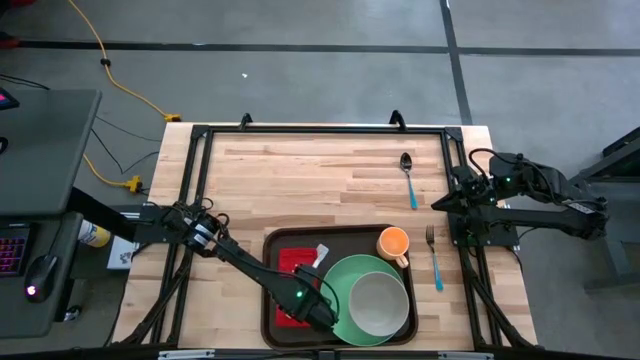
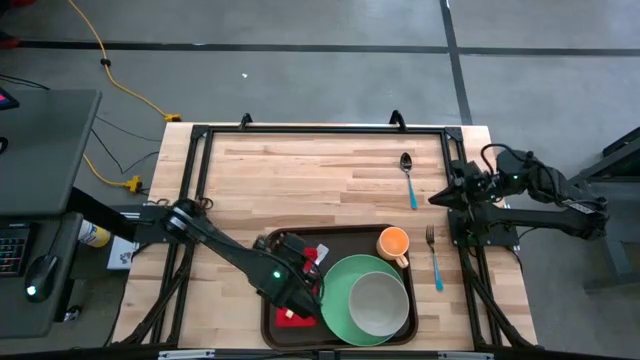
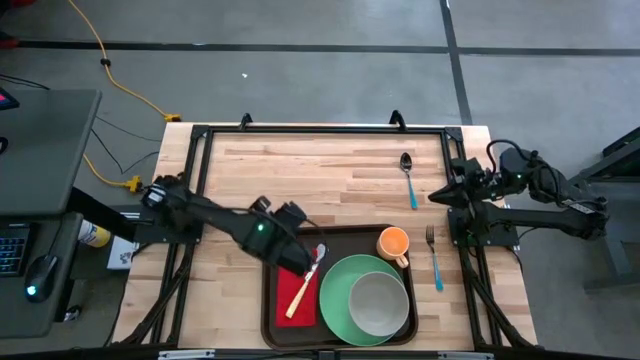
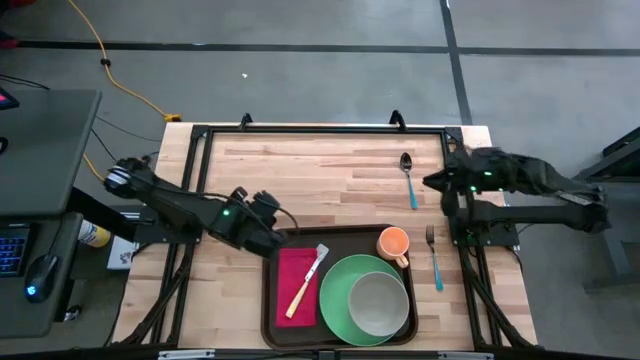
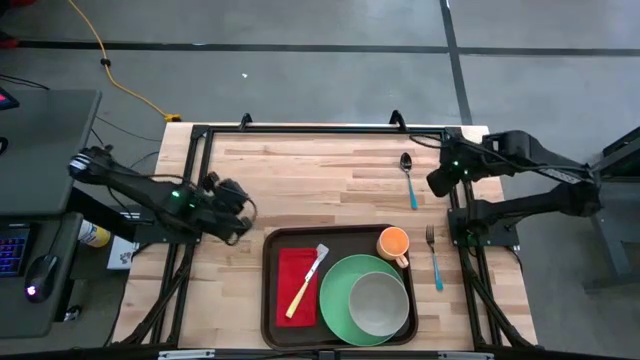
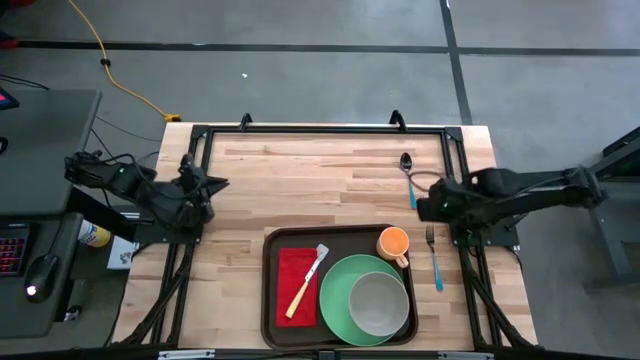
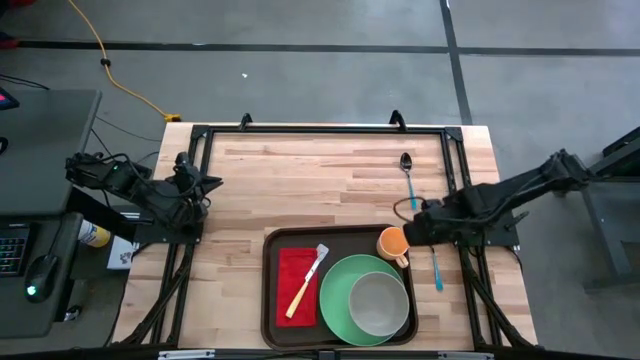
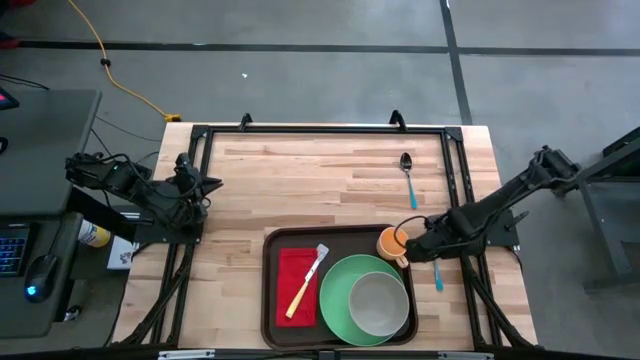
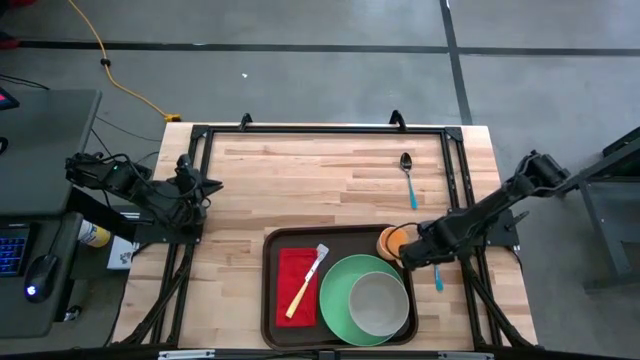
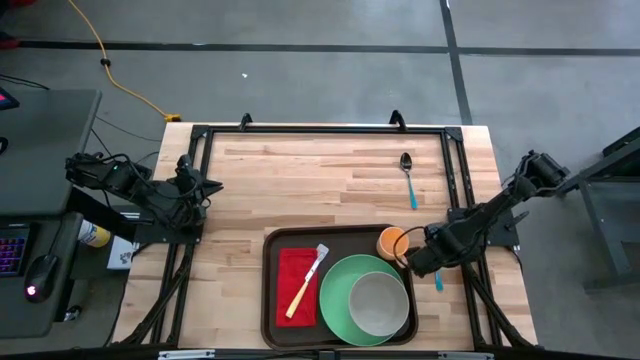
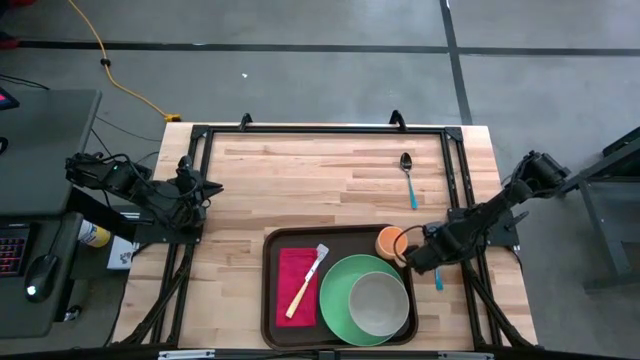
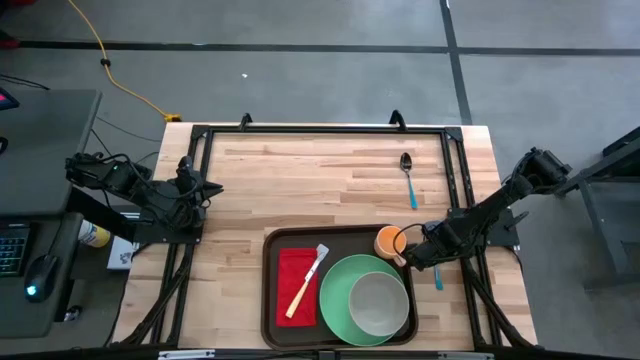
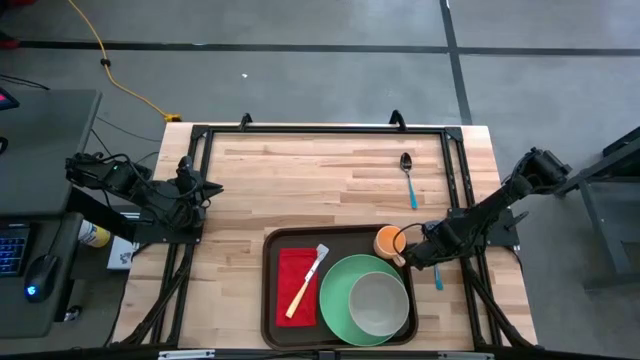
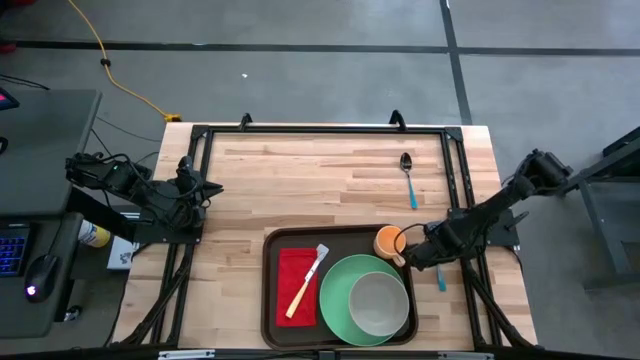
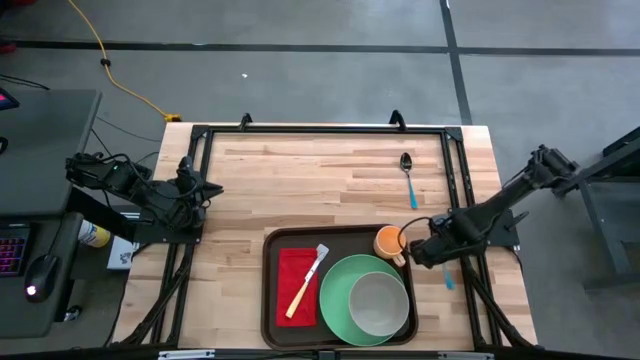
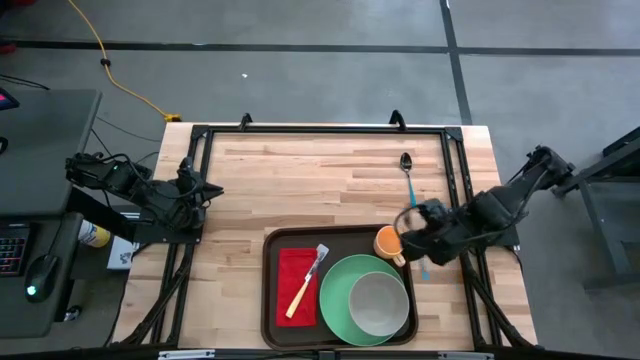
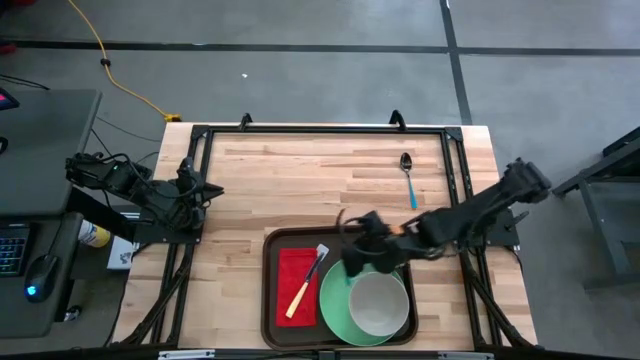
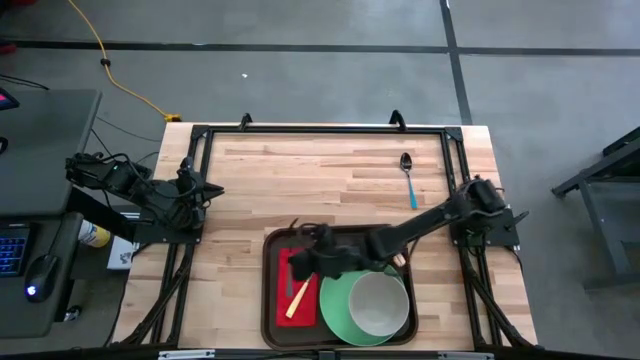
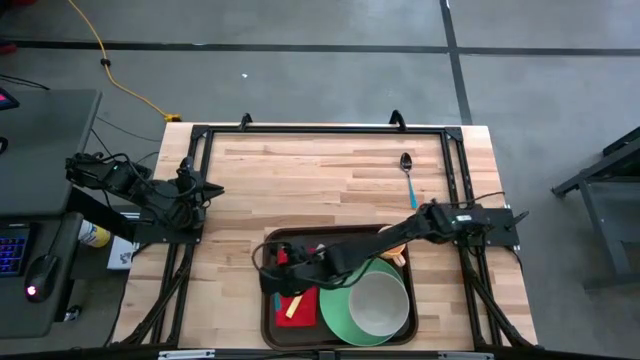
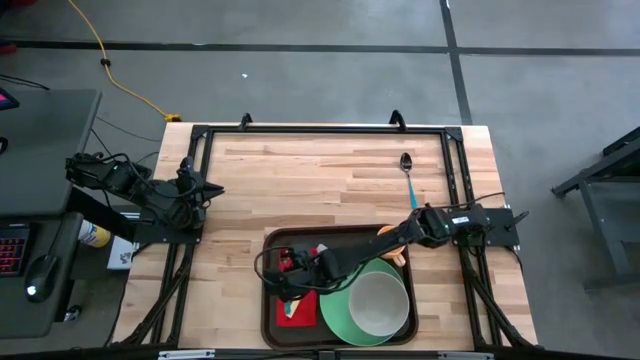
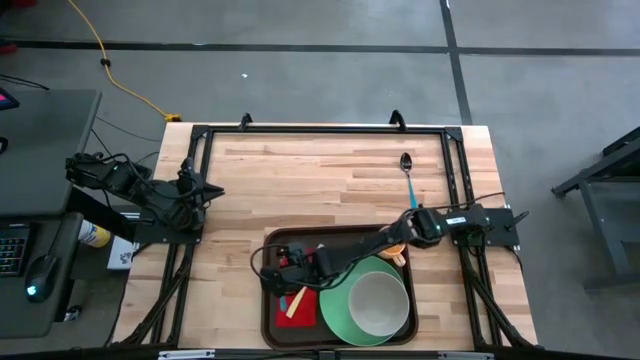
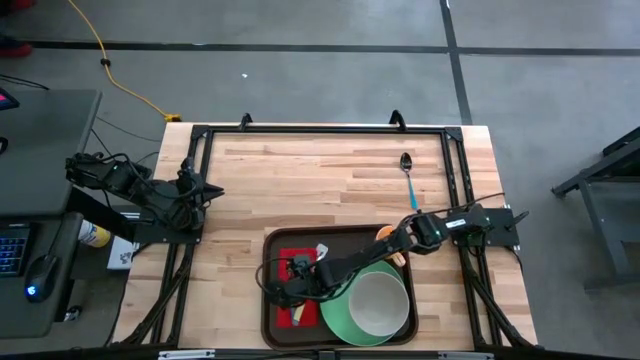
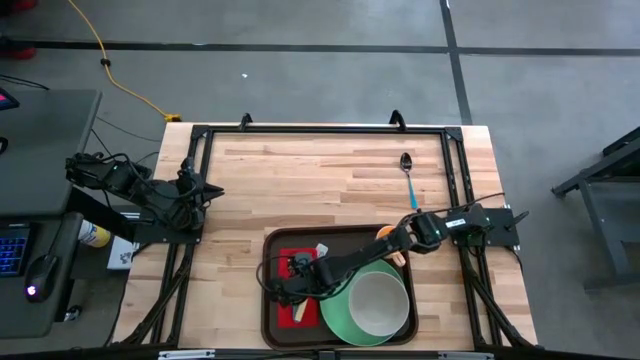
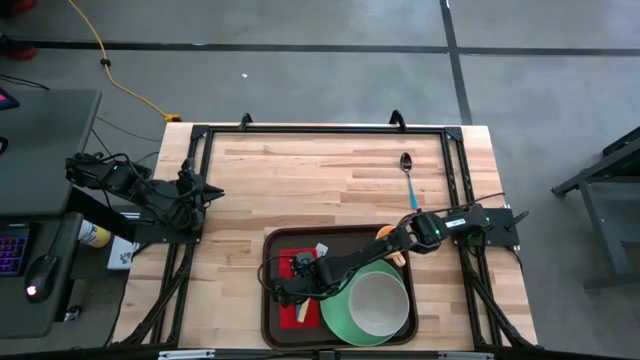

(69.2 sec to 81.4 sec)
Task: Set up tray
Put the blue fork on the red napkin to the left side of the yellow knife

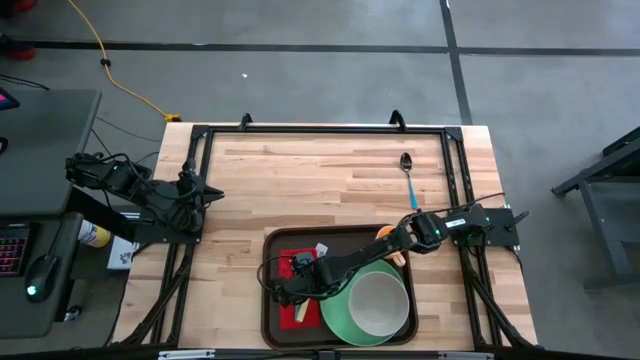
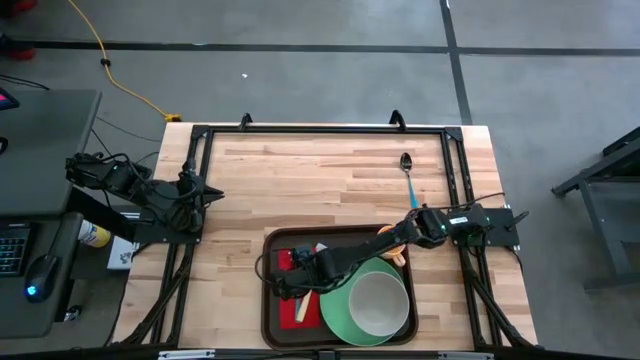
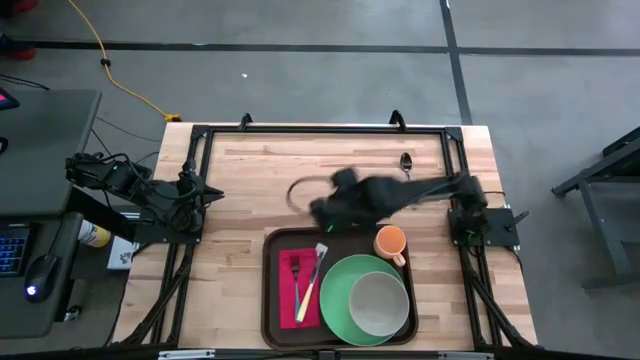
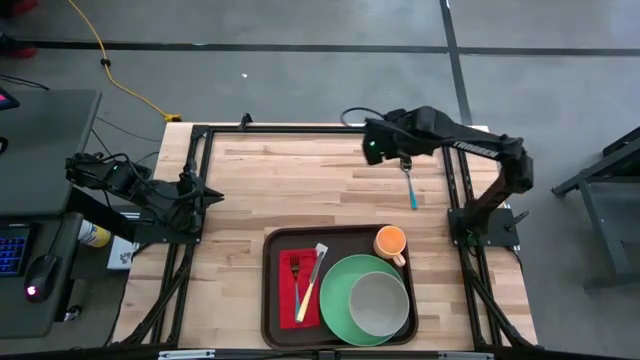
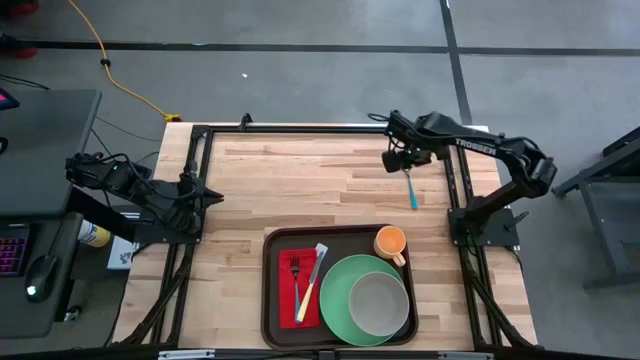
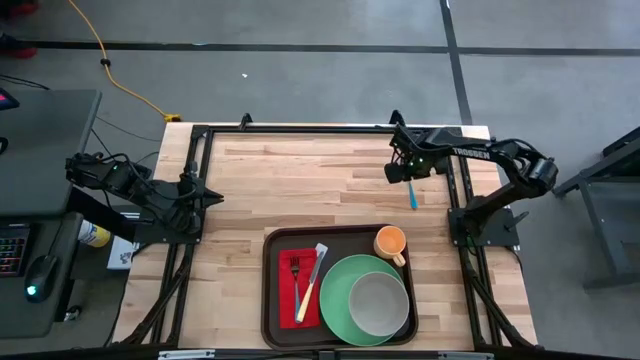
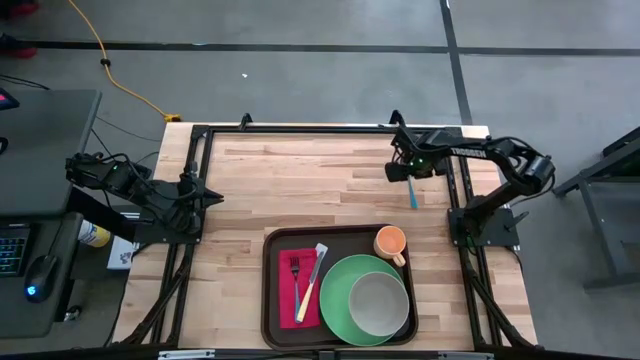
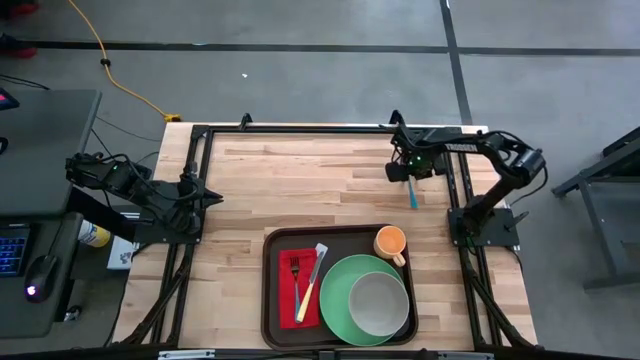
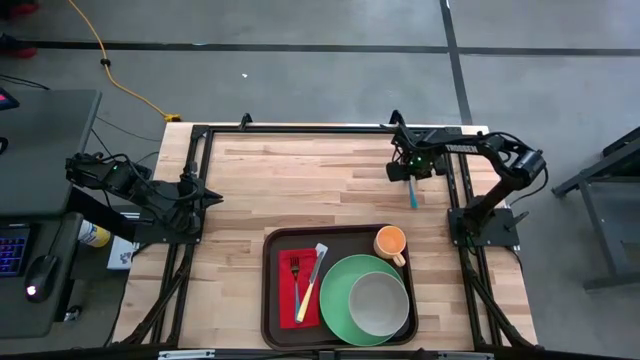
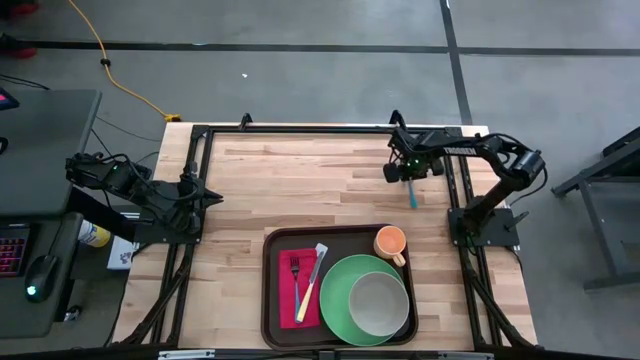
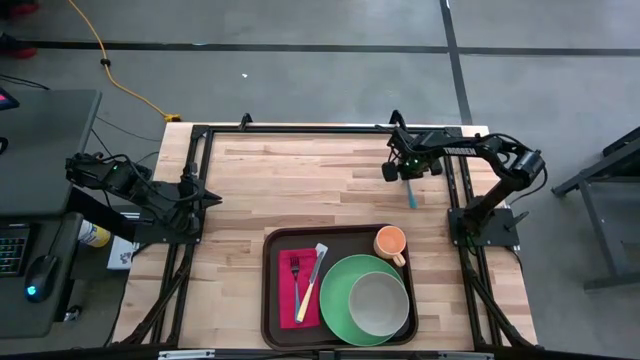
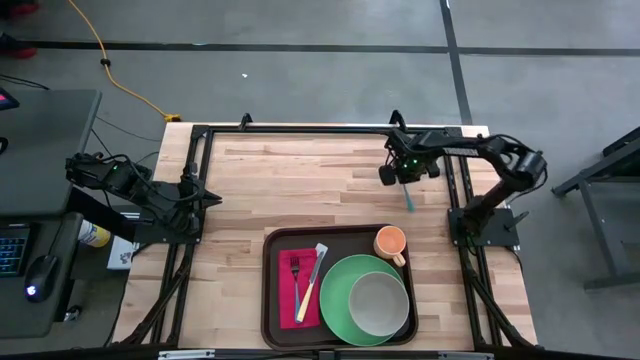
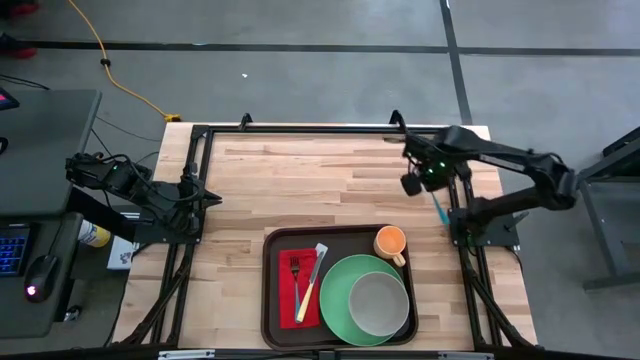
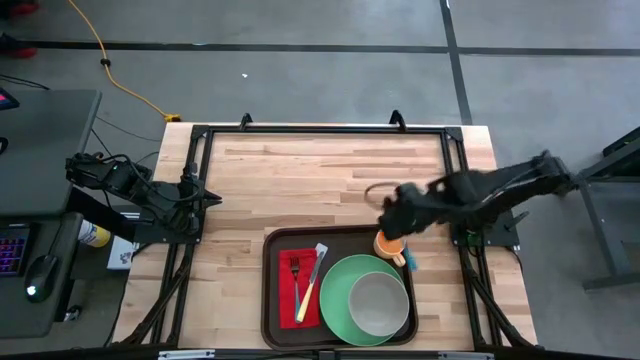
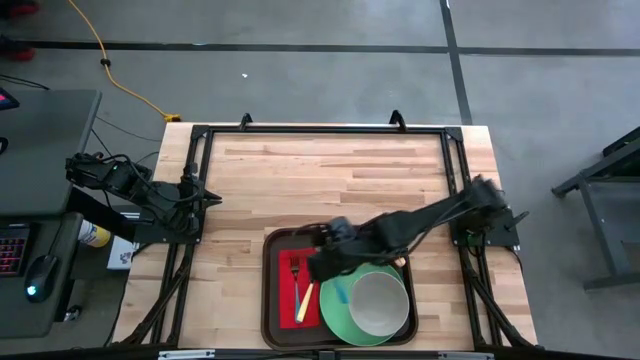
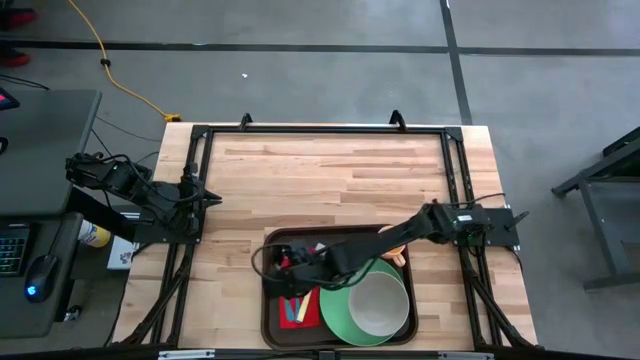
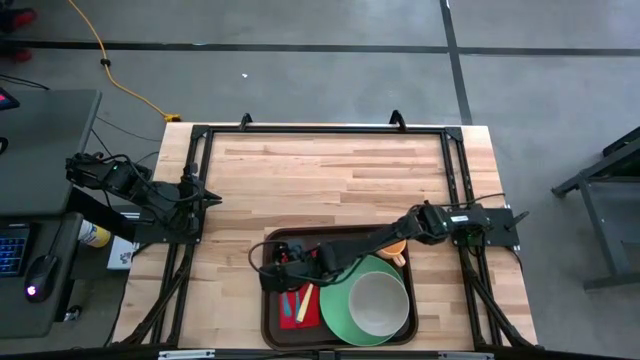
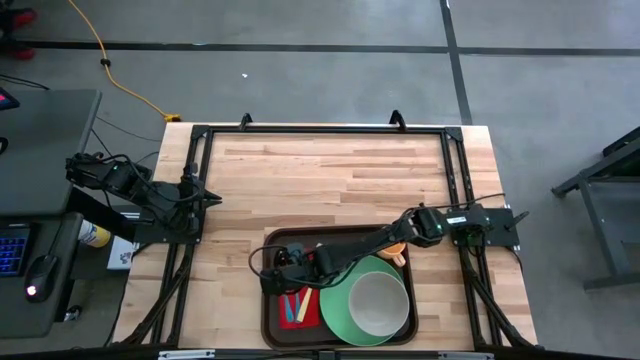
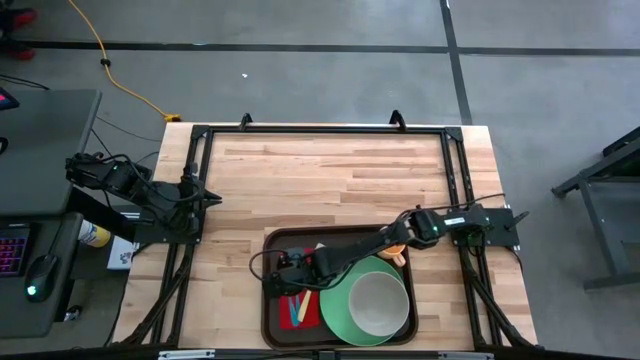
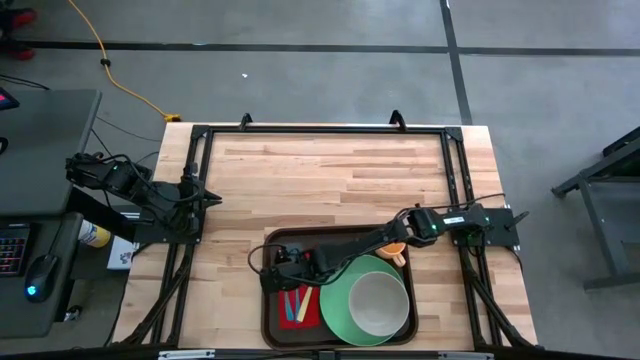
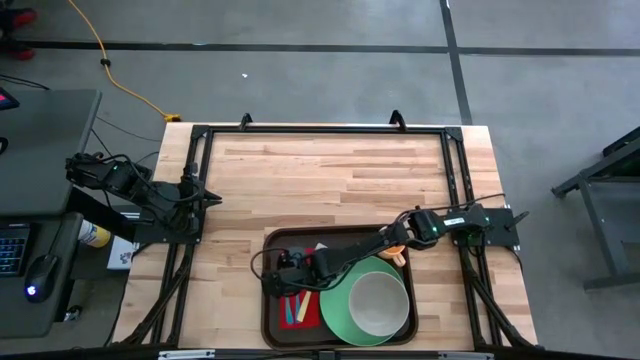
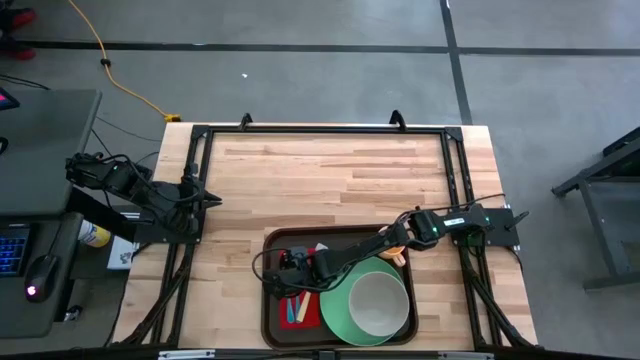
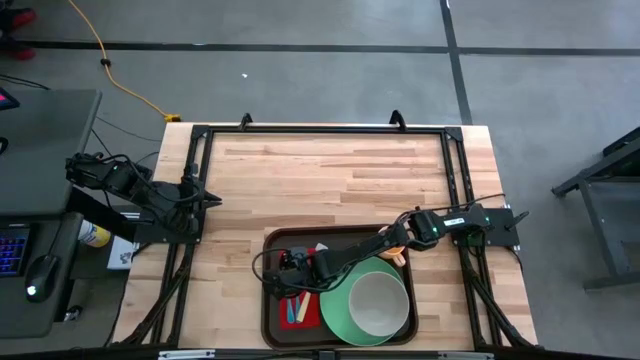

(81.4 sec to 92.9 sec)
Put the blue spoon on the red napkin to the left of the blue fork
